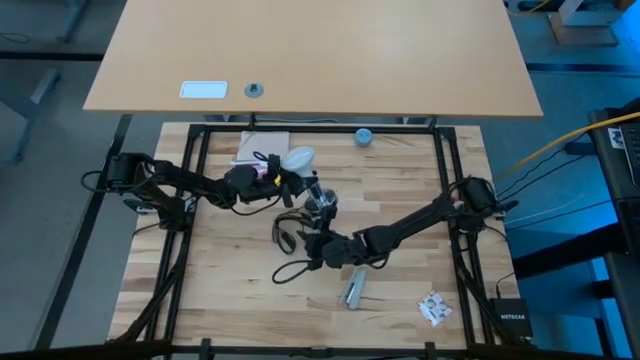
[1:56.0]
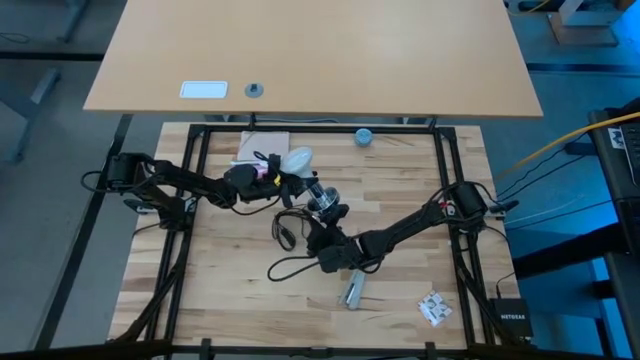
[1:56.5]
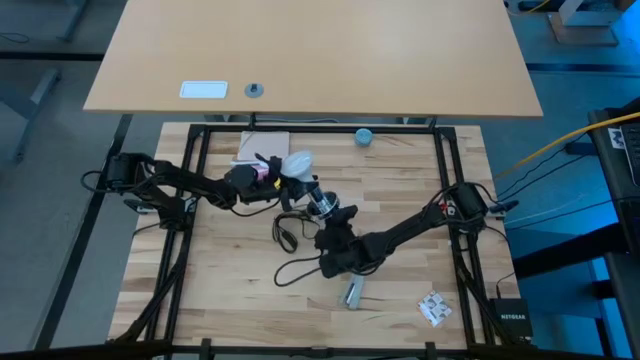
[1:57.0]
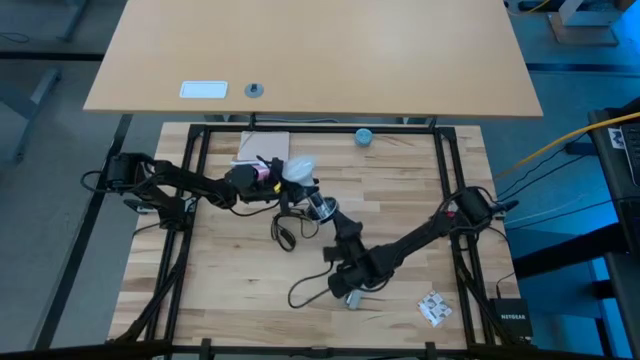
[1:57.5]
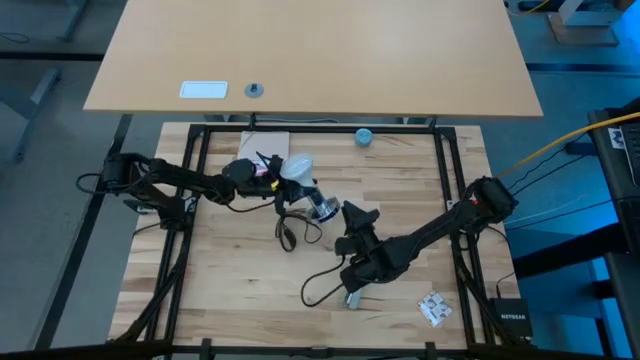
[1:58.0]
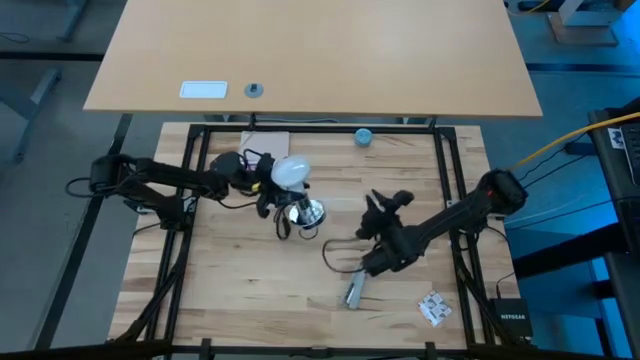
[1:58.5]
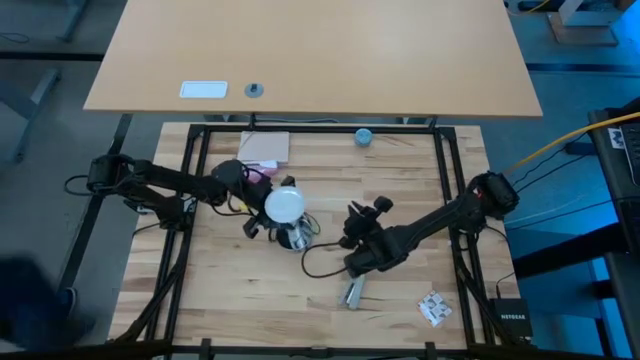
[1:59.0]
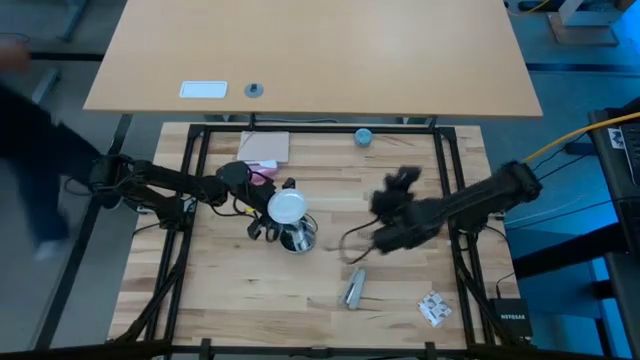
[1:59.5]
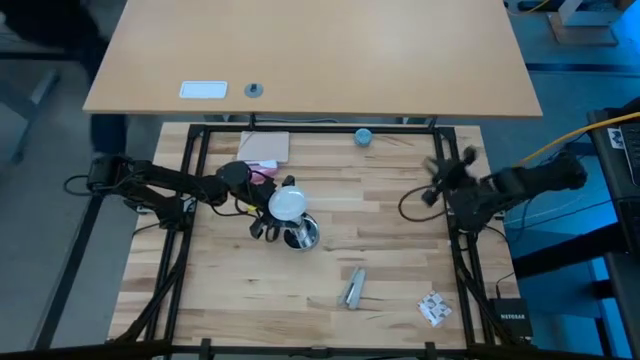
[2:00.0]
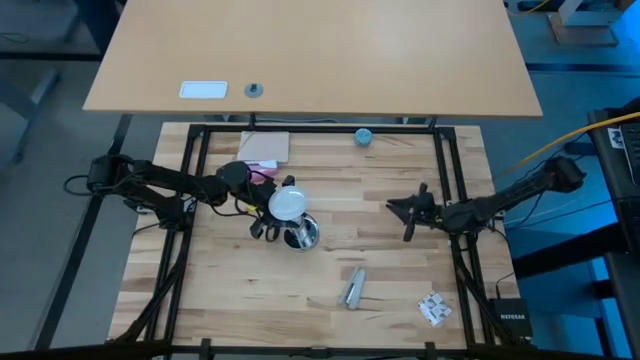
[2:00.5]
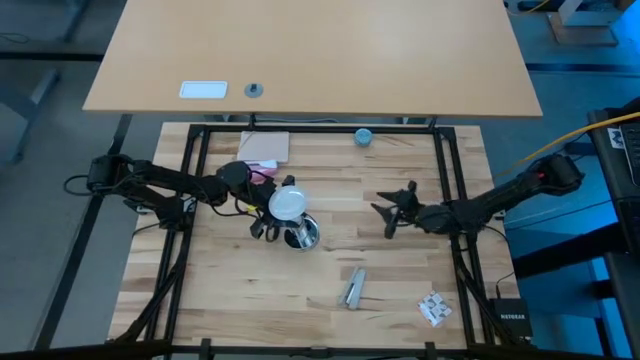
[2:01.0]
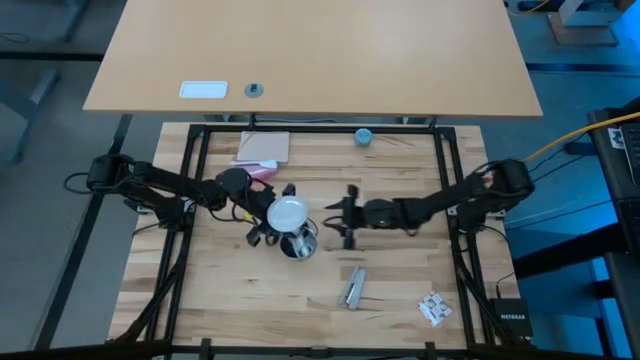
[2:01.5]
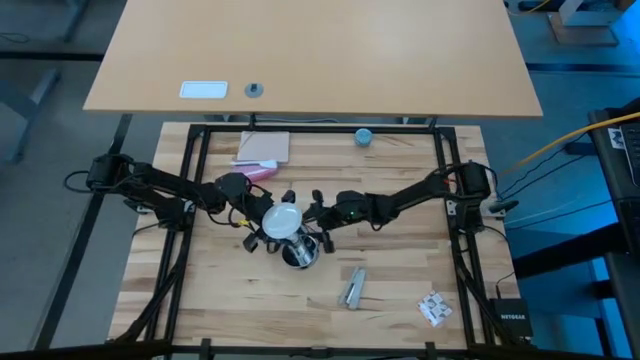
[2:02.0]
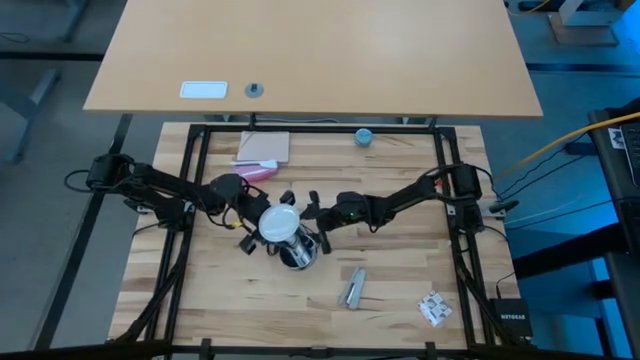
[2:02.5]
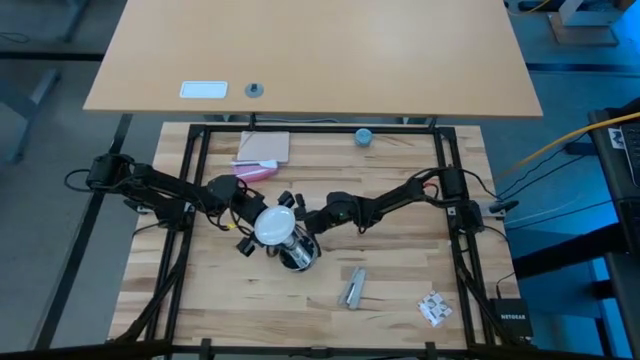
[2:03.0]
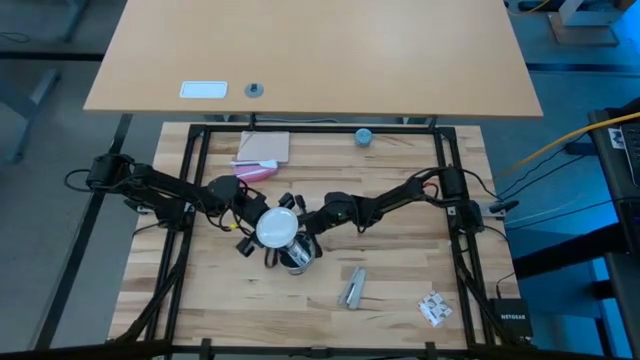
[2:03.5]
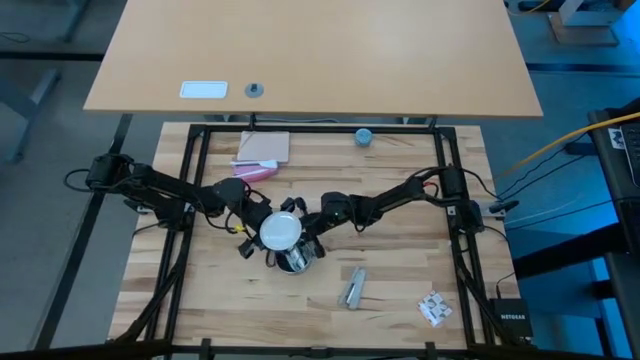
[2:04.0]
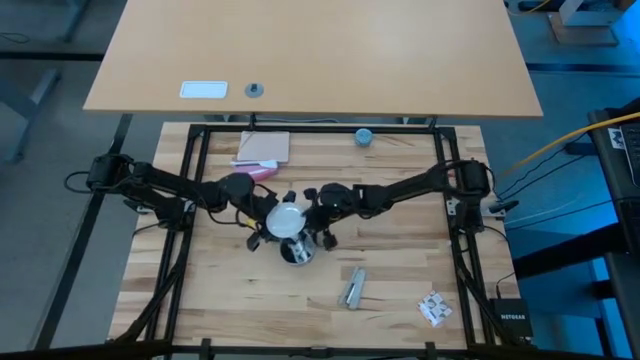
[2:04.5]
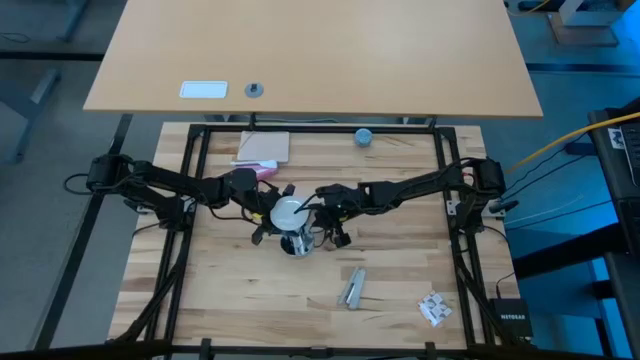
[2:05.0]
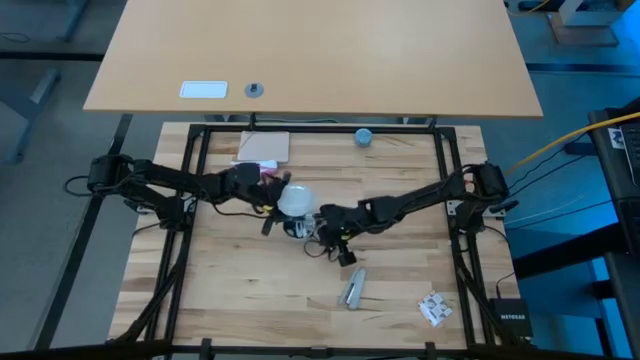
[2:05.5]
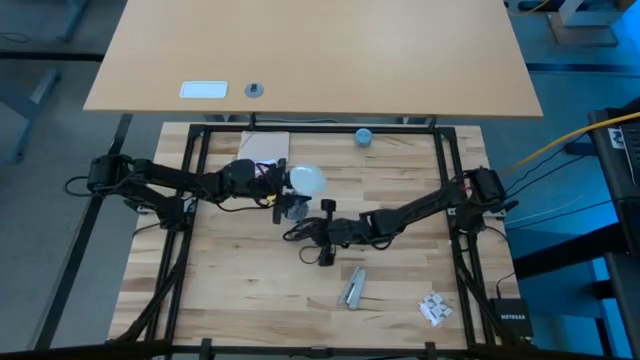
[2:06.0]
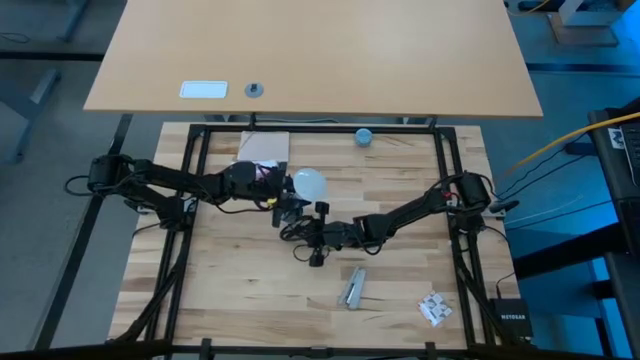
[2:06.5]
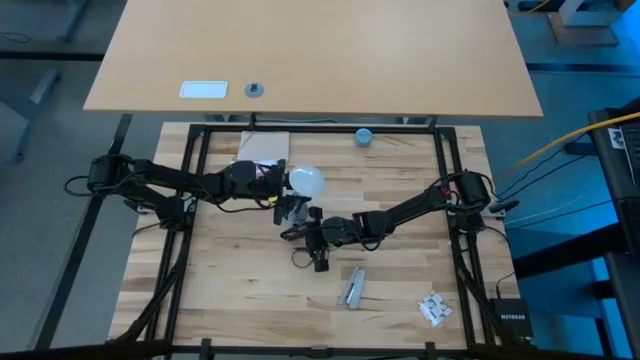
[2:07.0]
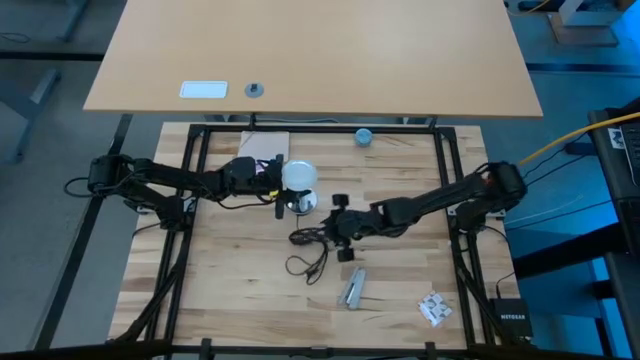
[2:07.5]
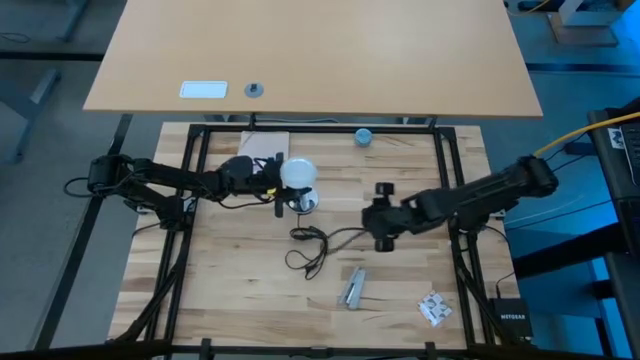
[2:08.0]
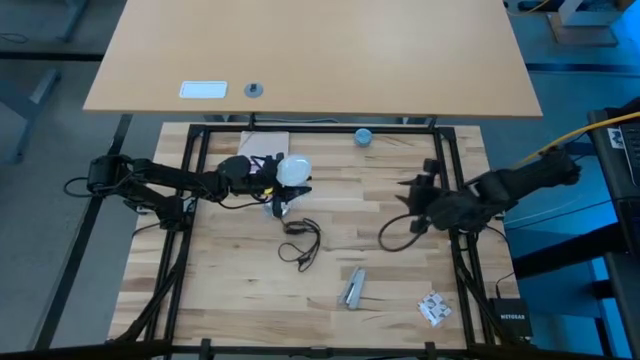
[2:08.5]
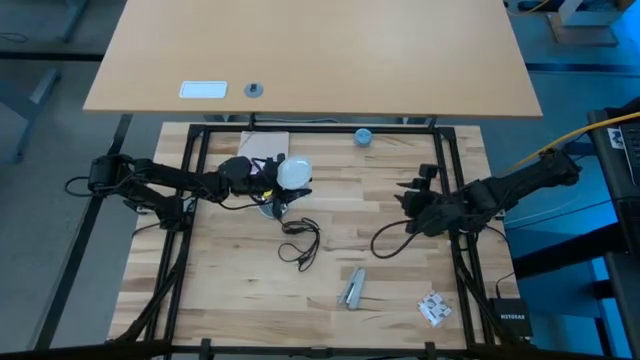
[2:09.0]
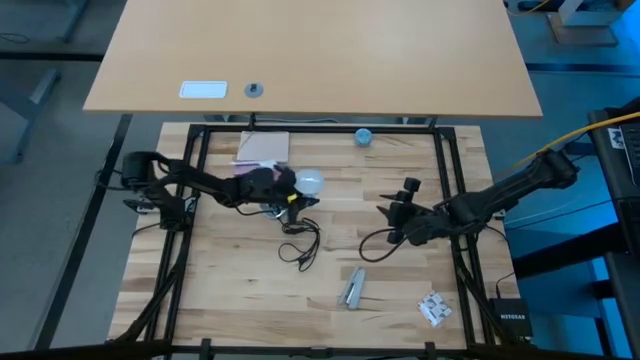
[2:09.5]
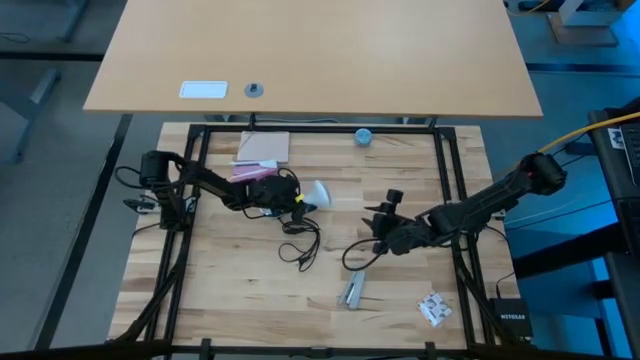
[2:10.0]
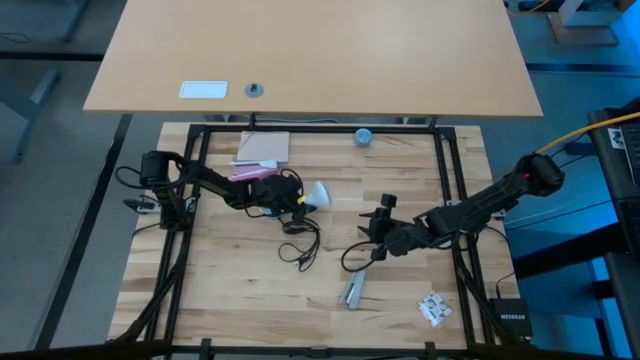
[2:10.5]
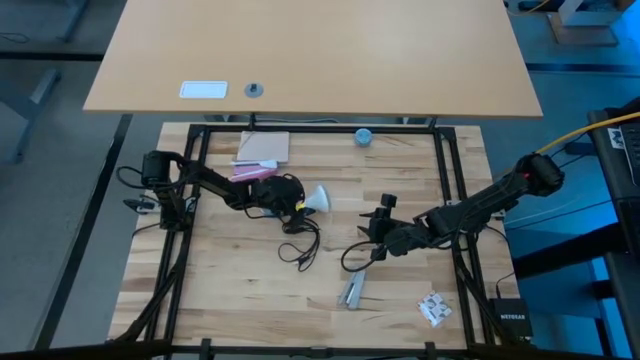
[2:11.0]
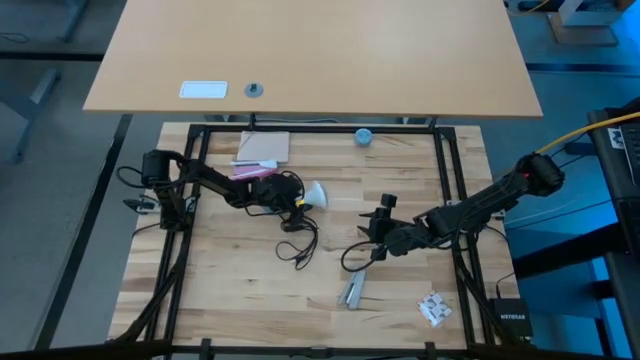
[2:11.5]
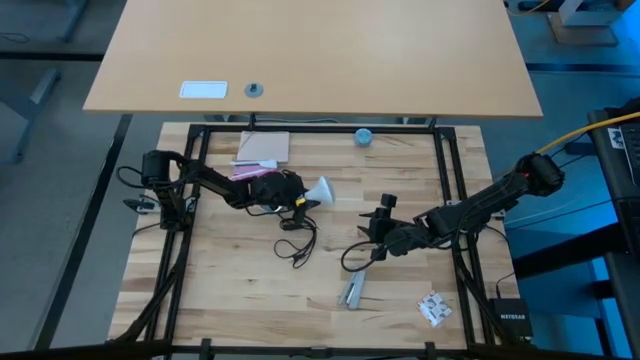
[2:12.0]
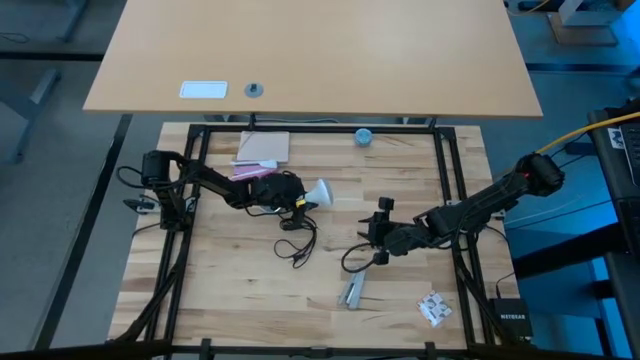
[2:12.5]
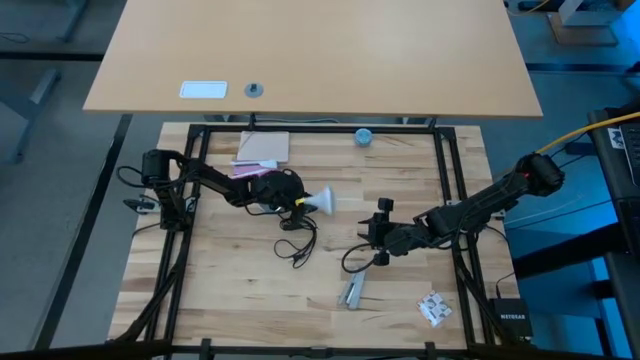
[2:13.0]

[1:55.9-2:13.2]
Task: Screw lightbulb
Remove the lightbulb from the lamp

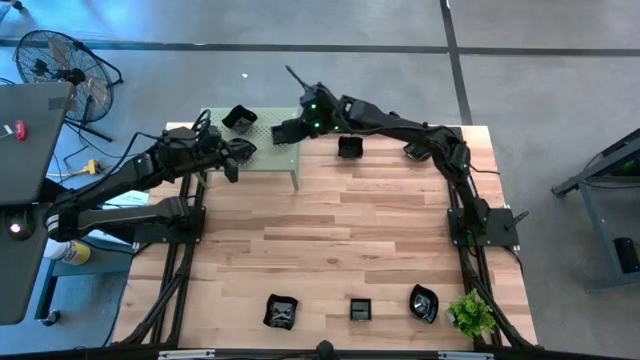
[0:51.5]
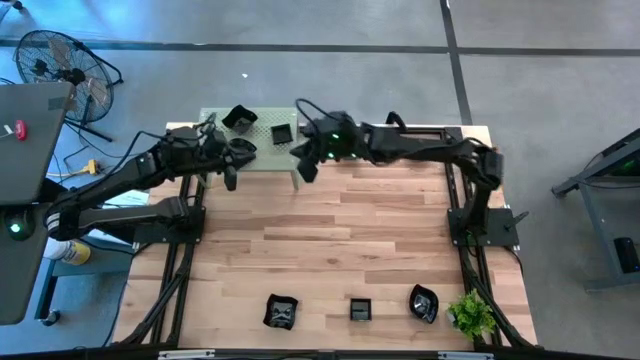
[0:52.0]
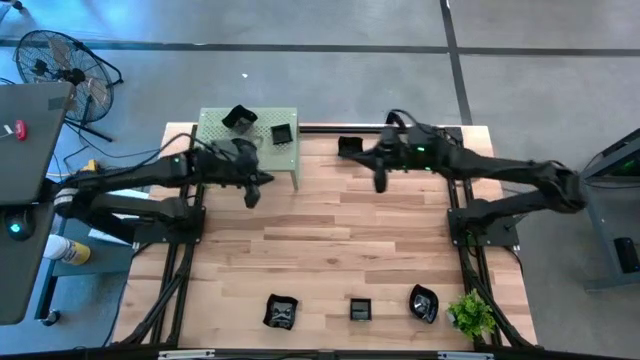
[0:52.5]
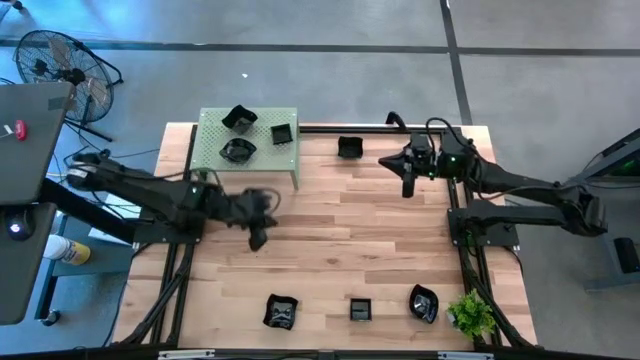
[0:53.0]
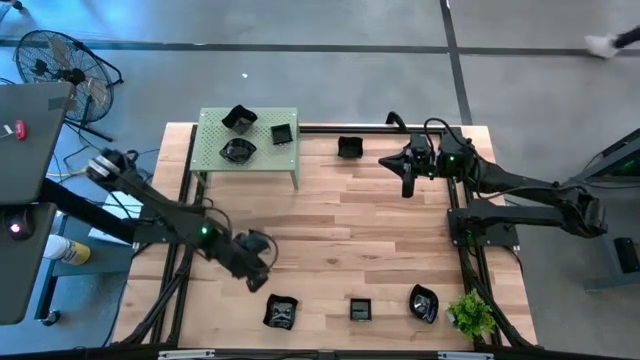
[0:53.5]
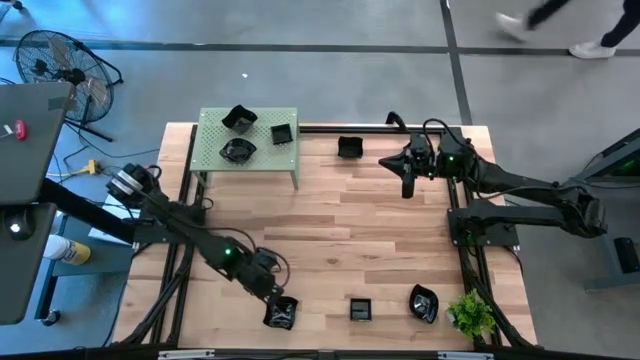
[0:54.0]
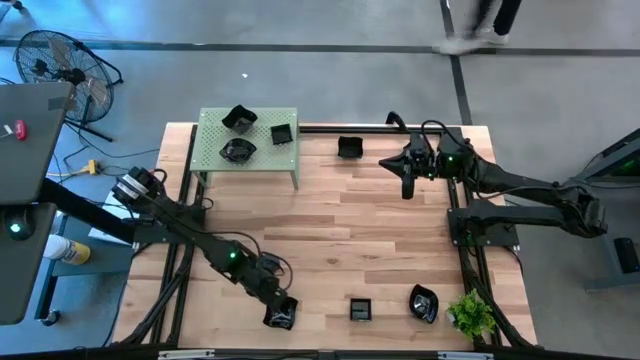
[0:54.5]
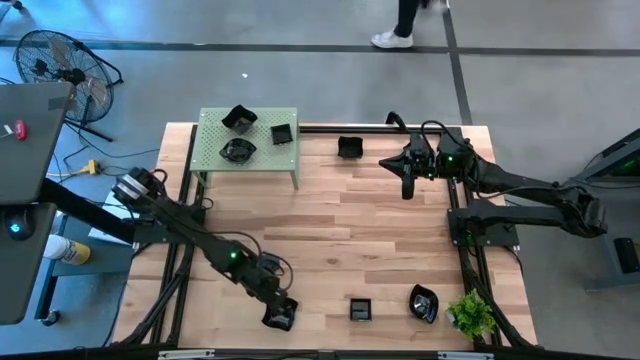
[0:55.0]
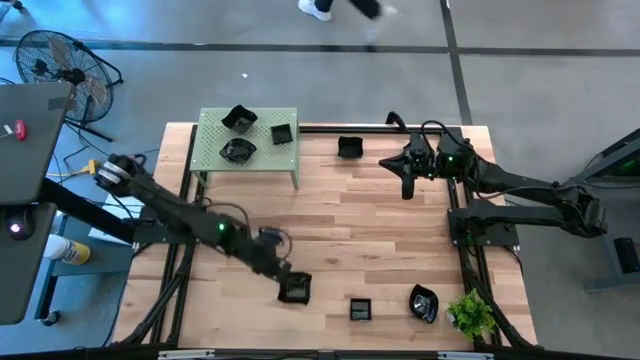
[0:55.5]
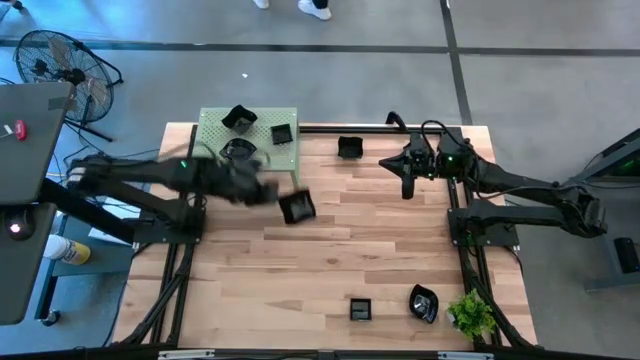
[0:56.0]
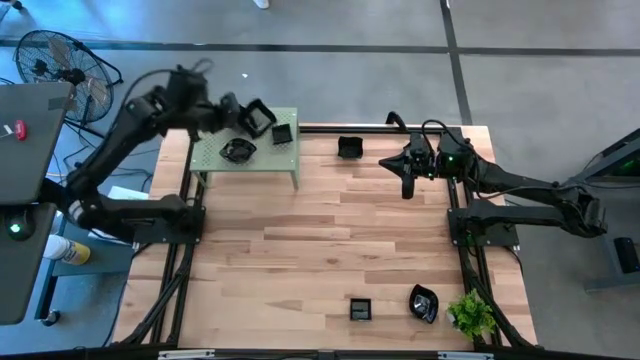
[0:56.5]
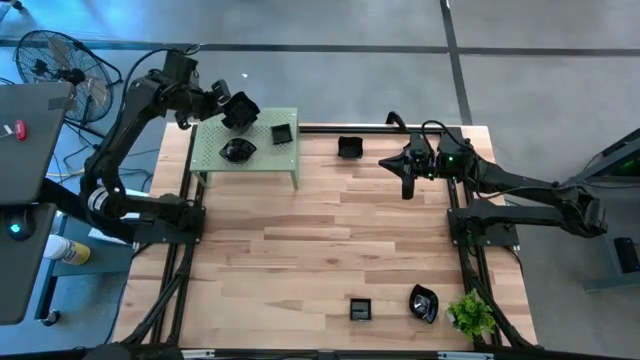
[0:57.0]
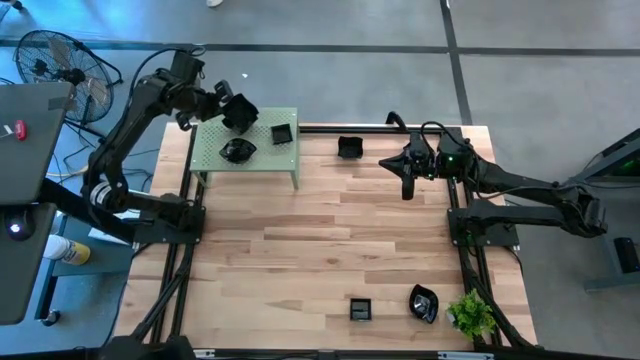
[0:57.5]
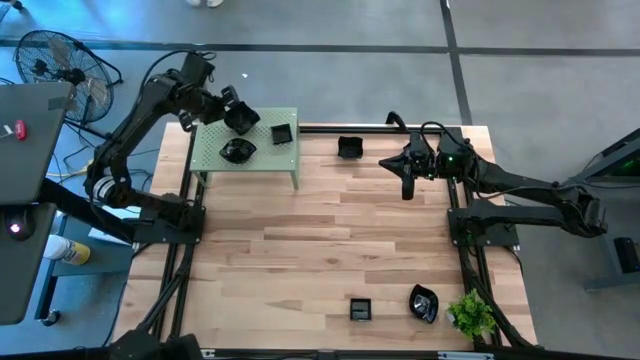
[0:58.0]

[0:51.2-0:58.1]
Task: Pick & Place Mini shaped plates
Stack the black distorted square plate on top of the stacked black distorted square plate on the shelf
